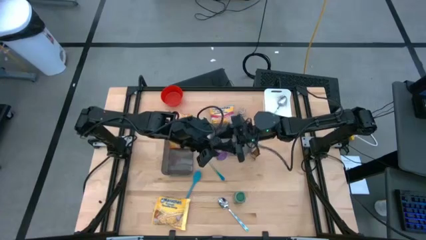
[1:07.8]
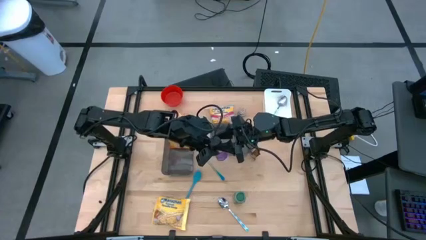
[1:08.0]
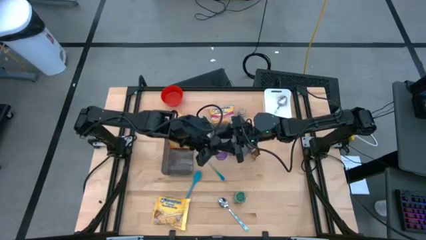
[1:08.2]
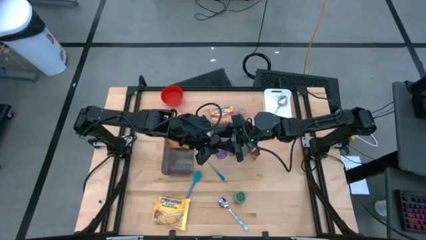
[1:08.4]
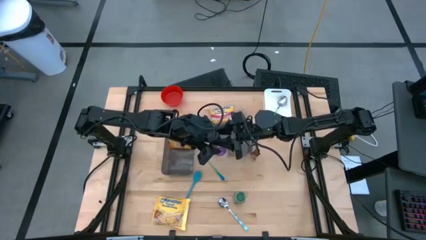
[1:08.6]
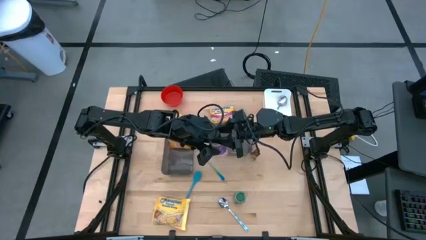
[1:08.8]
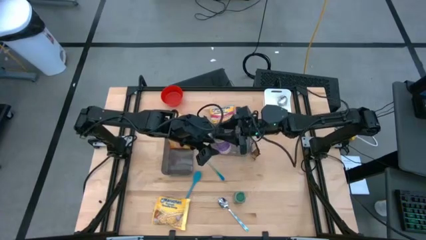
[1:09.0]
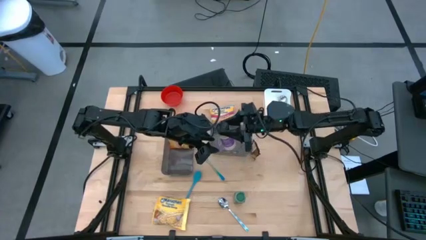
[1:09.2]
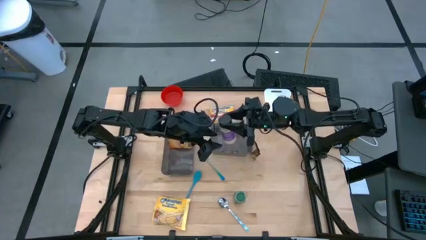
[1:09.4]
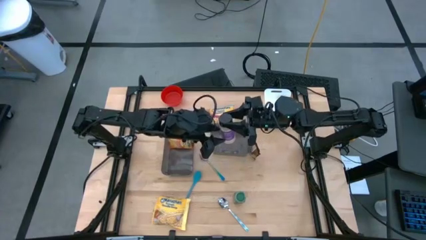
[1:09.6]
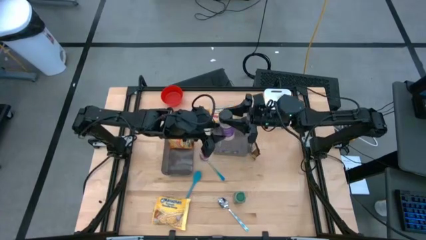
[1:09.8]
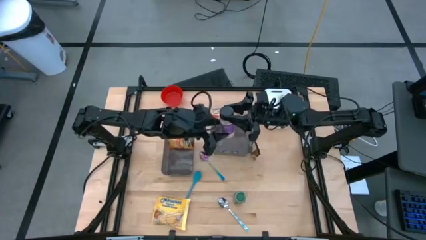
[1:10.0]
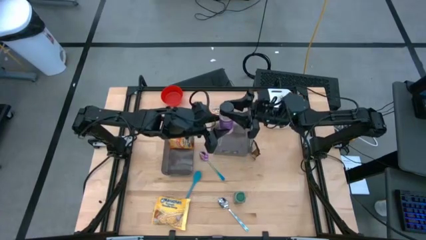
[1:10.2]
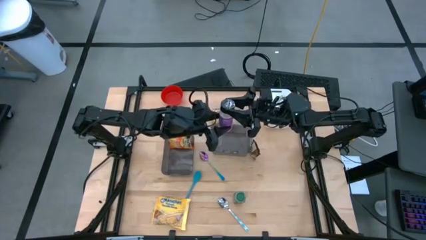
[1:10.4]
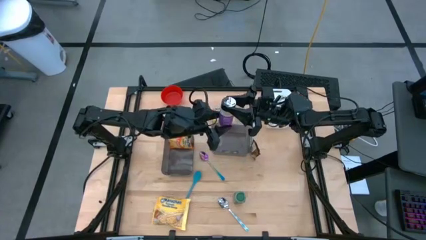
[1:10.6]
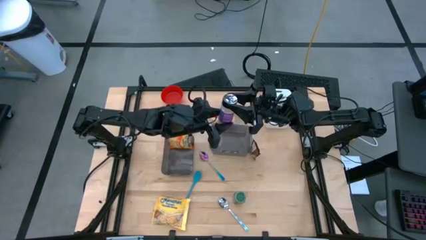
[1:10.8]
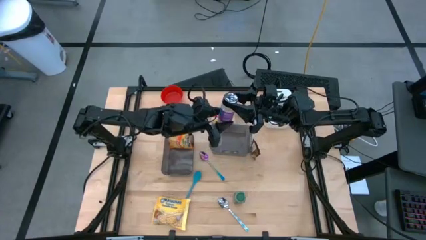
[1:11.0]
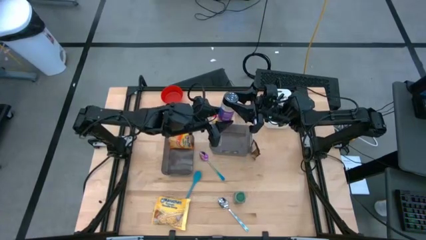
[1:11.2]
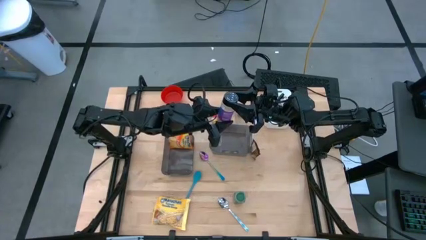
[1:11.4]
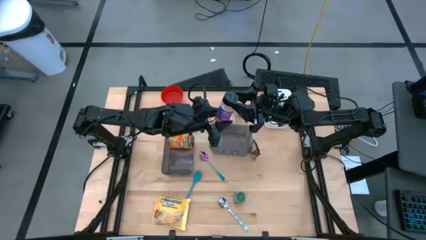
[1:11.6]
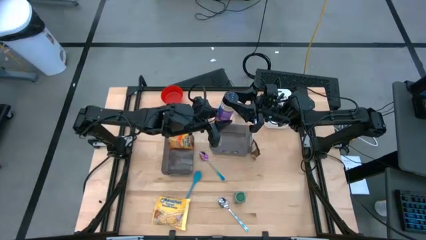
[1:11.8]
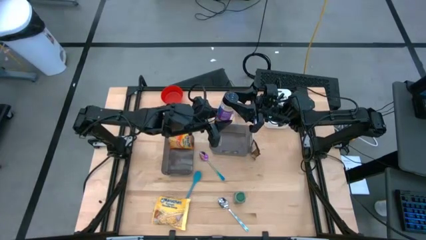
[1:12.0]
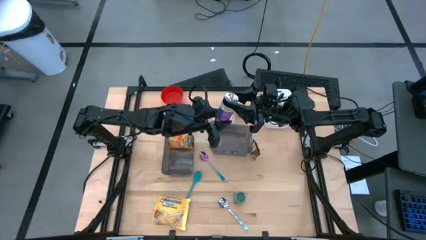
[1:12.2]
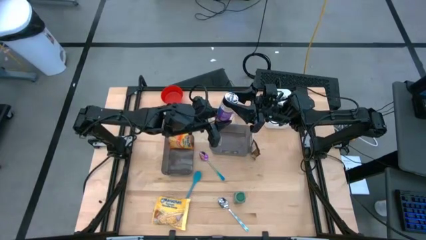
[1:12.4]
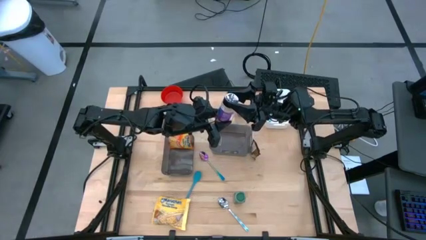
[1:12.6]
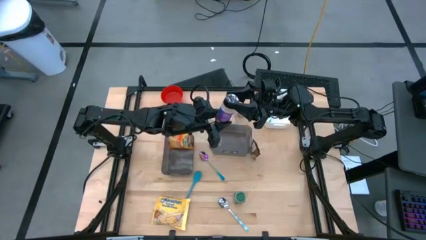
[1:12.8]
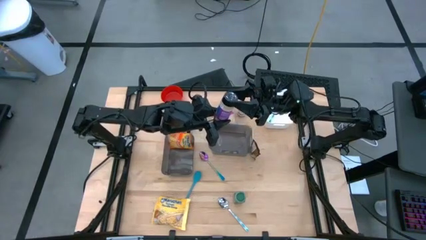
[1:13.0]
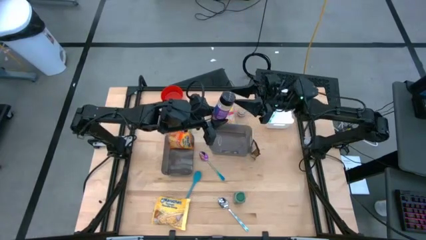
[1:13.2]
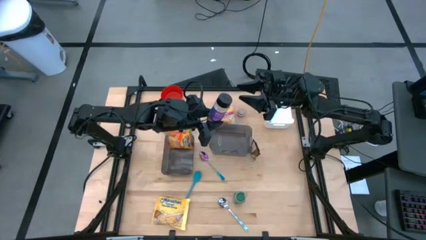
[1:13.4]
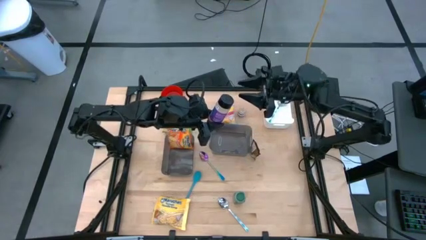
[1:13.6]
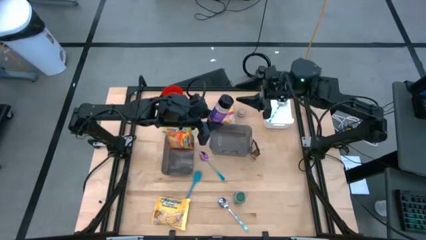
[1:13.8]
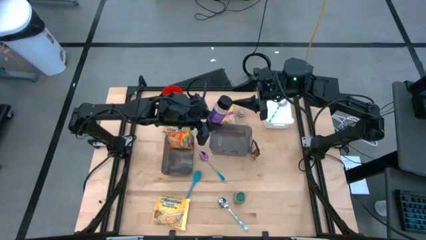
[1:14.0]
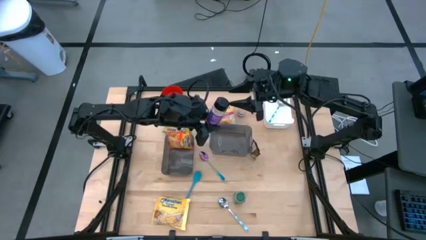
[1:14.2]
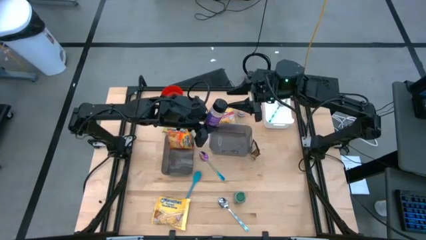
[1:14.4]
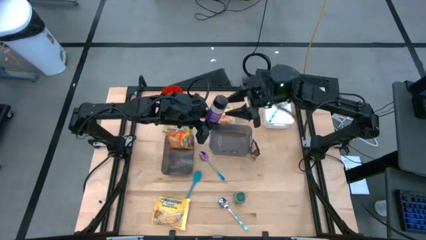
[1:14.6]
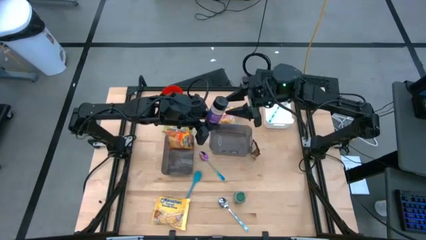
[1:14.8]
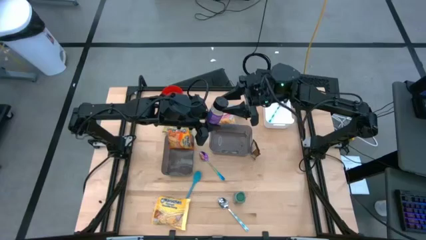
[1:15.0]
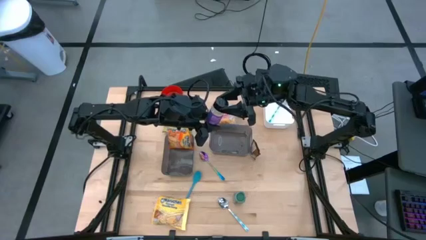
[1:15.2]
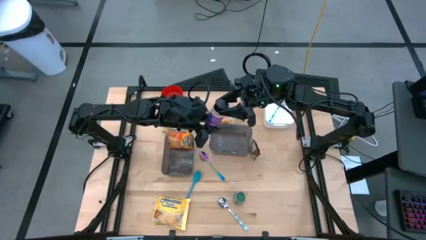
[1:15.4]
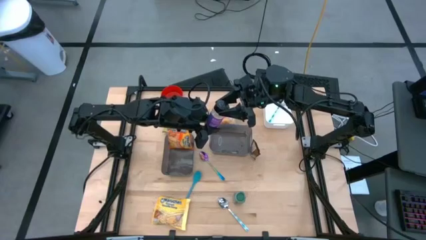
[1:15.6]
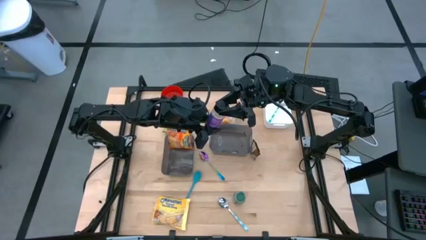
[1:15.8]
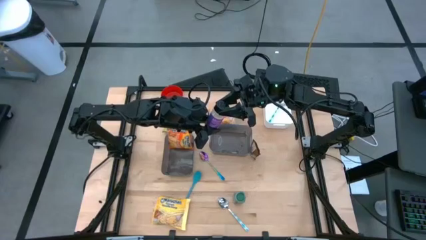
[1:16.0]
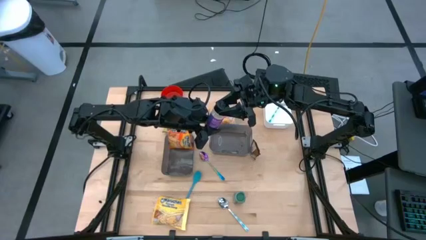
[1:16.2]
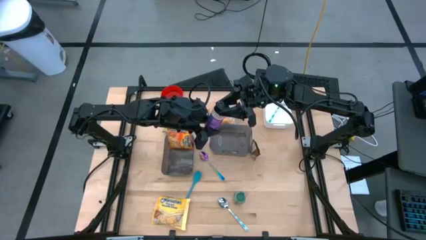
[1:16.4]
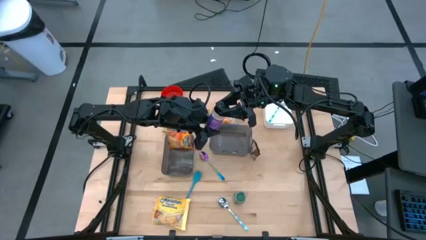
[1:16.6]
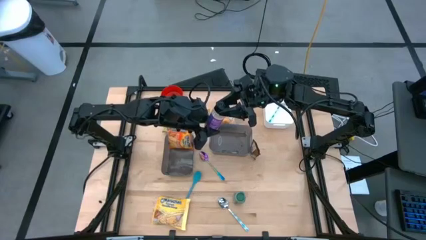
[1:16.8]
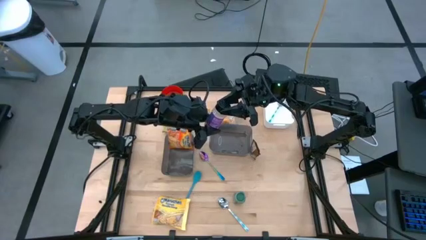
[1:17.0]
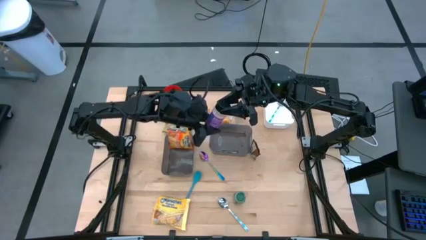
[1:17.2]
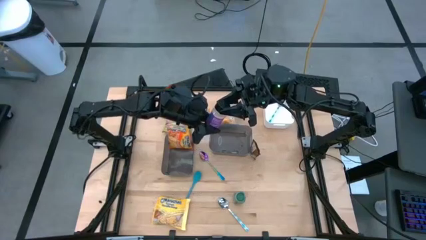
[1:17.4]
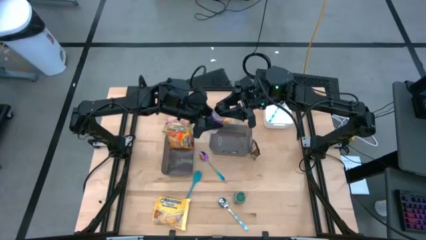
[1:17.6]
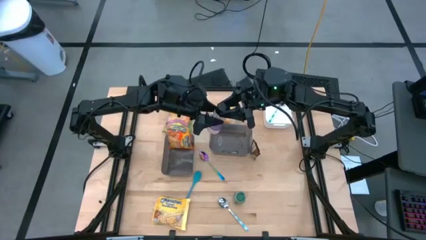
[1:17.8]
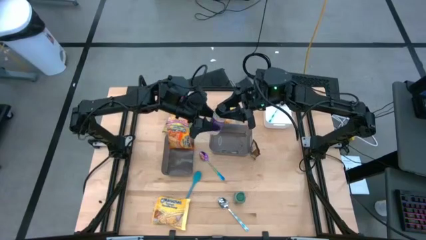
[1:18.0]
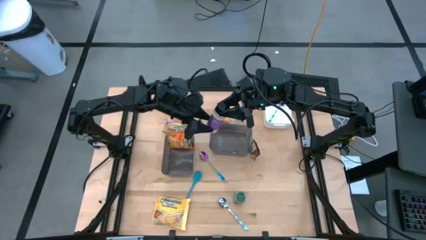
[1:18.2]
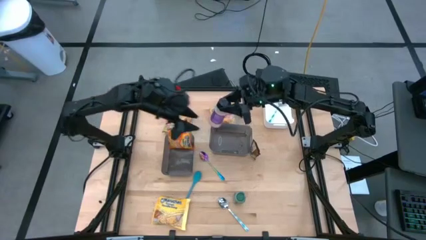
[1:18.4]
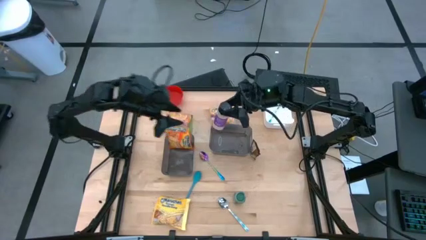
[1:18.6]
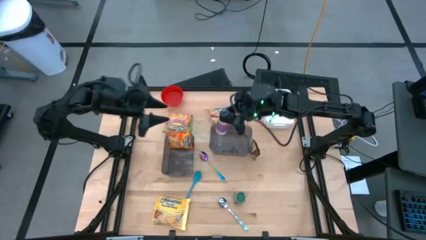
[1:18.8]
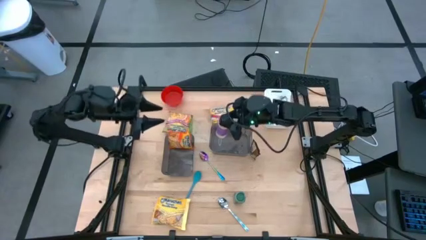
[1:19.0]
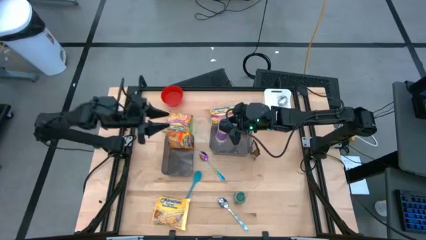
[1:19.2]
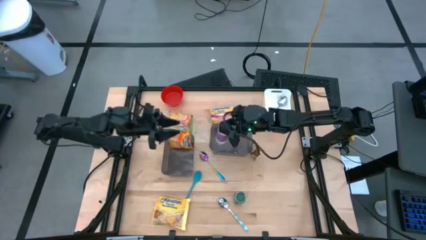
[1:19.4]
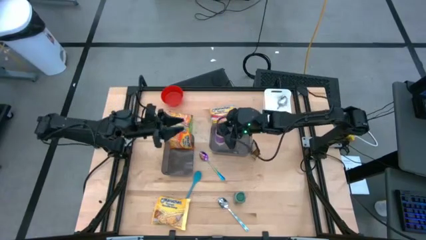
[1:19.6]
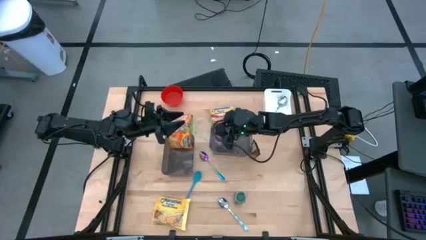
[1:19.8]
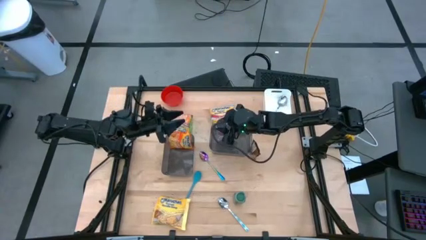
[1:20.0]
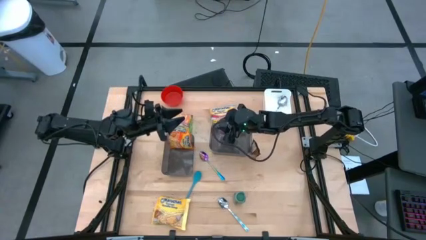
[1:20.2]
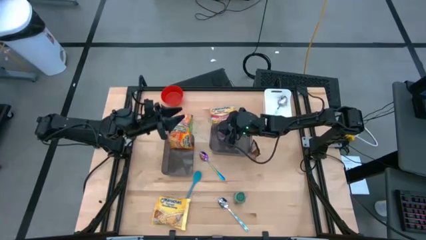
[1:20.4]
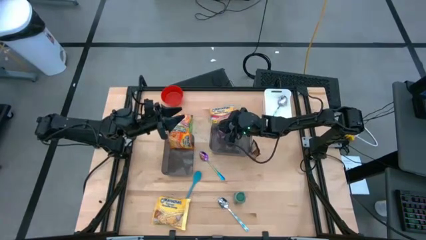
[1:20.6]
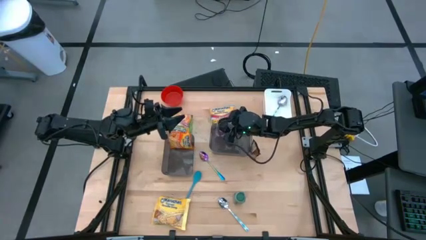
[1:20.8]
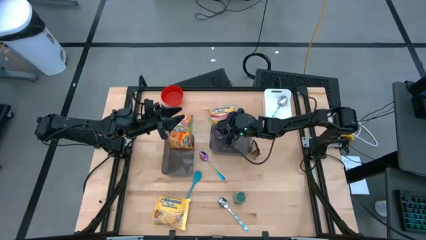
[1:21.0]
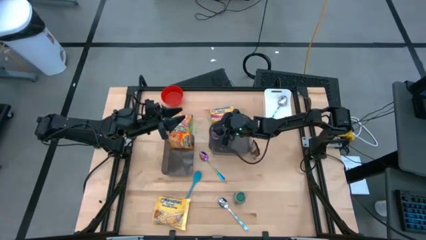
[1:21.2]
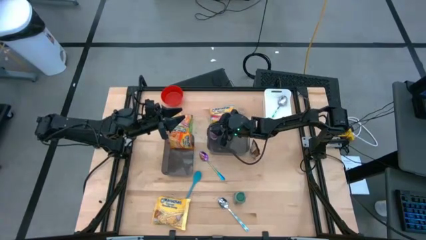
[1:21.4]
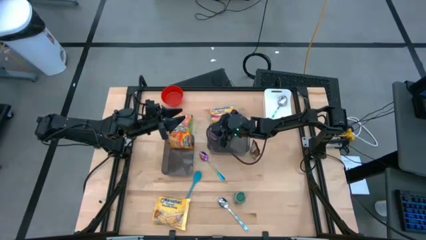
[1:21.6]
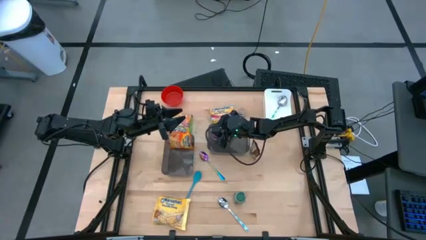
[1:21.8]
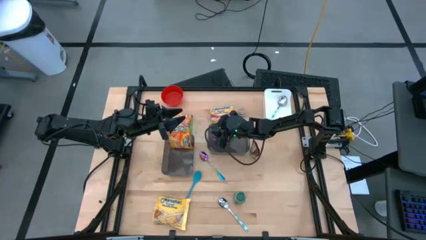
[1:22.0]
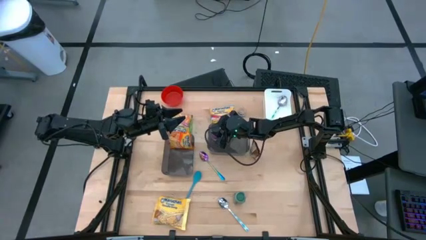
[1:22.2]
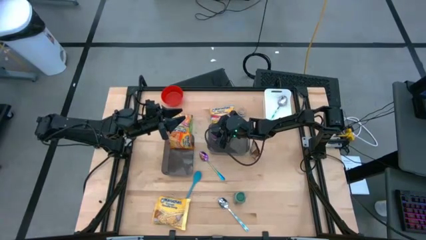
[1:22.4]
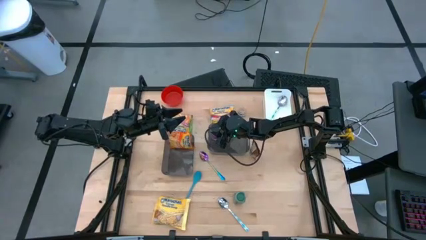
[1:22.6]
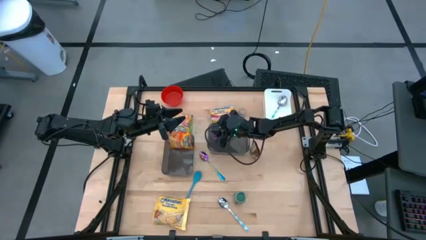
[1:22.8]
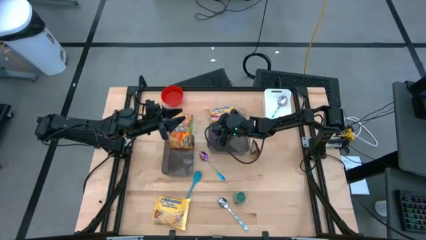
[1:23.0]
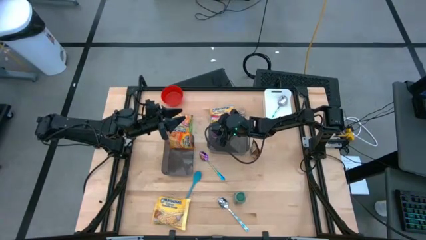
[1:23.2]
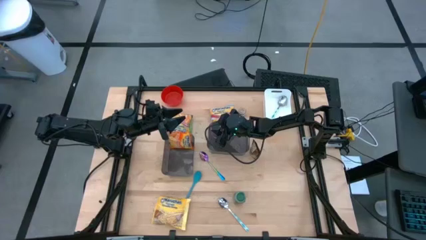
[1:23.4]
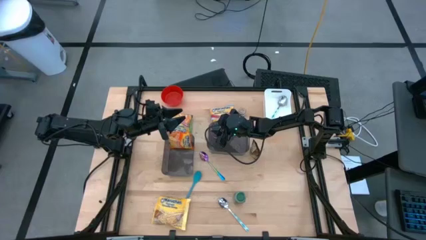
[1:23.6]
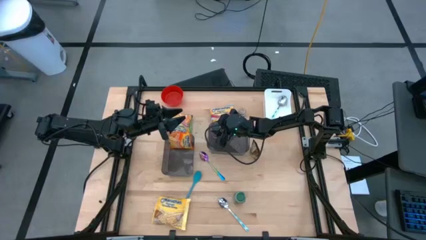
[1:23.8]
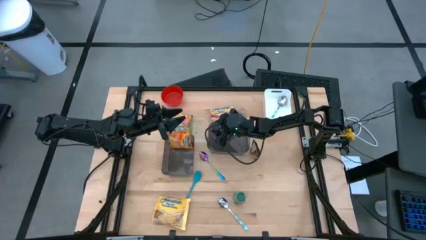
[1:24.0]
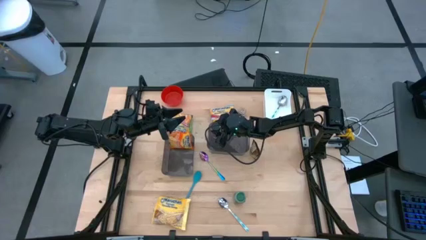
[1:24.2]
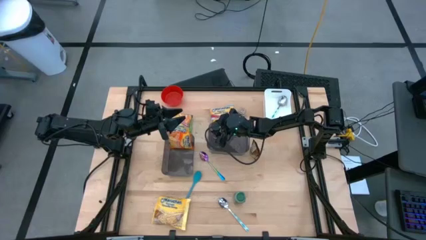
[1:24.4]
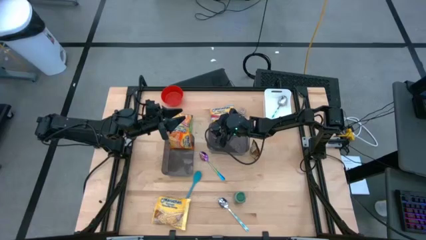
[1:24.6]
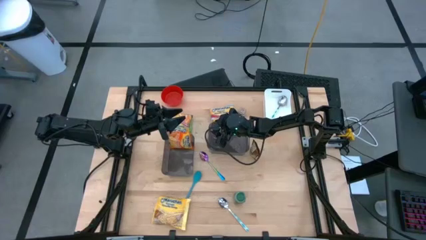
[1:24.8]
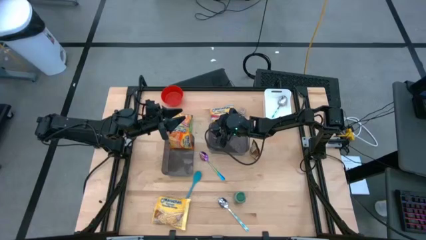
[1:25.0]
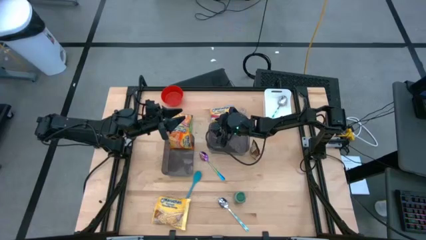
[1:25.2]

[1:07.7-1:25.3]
Task: Pick & Place Food Item
Put the black spice bottle into the right black bin
